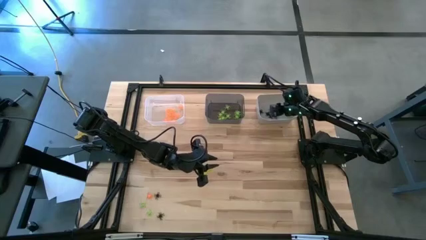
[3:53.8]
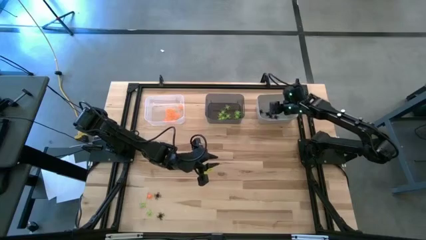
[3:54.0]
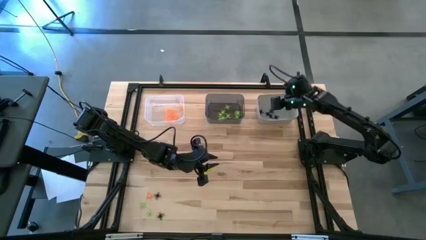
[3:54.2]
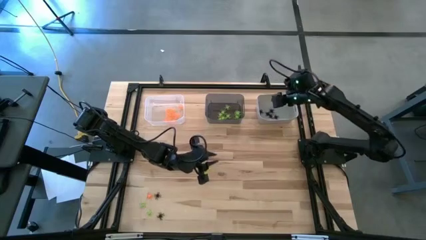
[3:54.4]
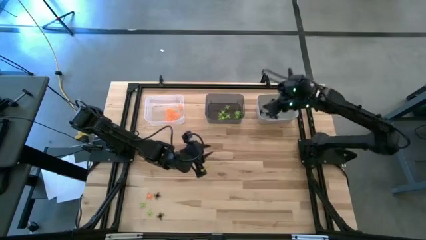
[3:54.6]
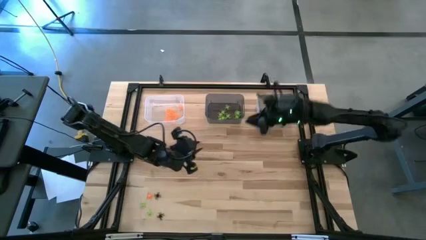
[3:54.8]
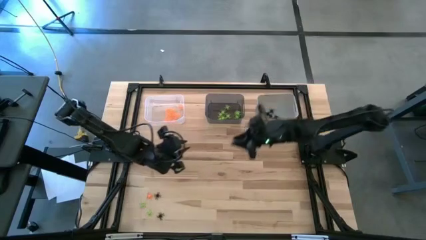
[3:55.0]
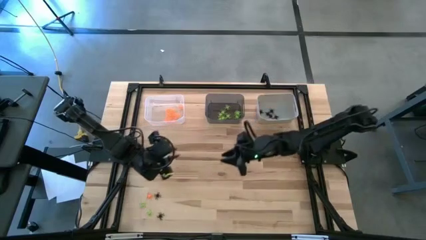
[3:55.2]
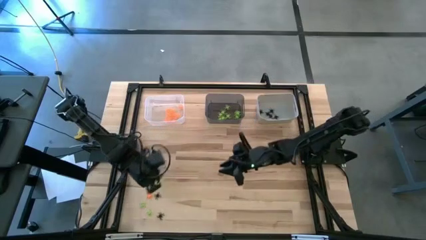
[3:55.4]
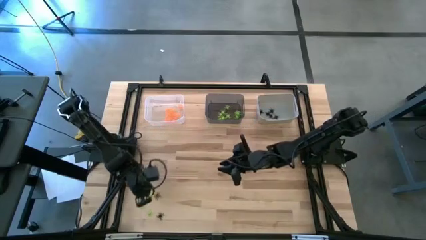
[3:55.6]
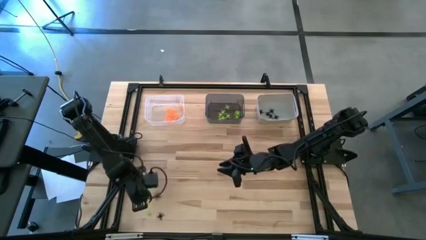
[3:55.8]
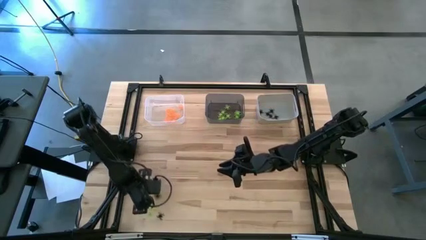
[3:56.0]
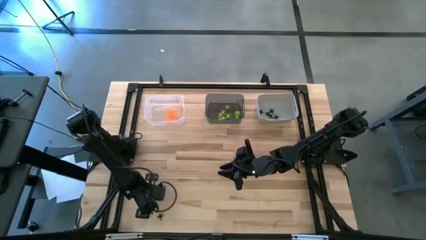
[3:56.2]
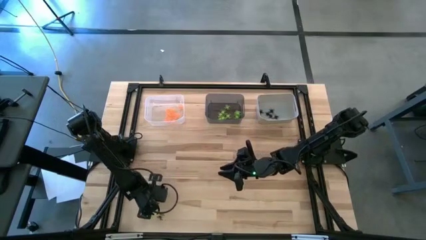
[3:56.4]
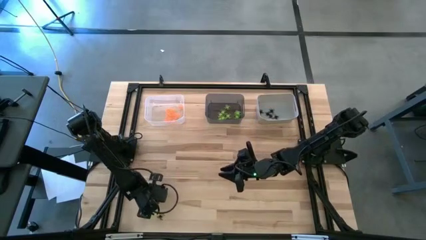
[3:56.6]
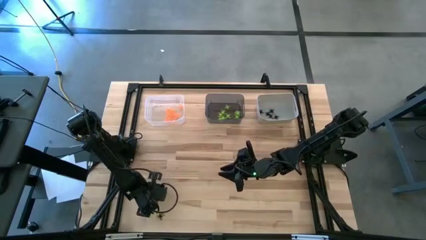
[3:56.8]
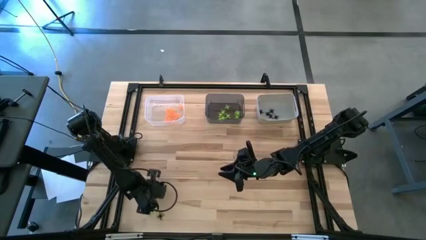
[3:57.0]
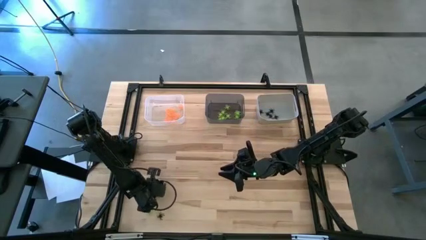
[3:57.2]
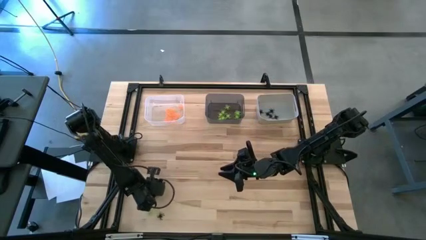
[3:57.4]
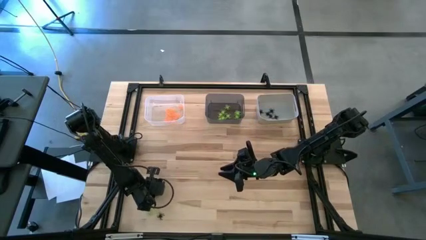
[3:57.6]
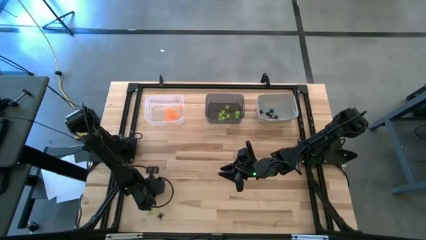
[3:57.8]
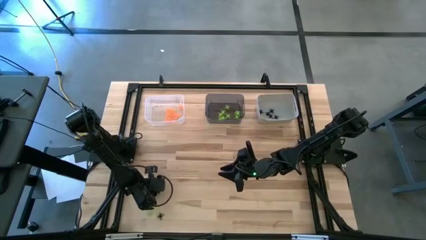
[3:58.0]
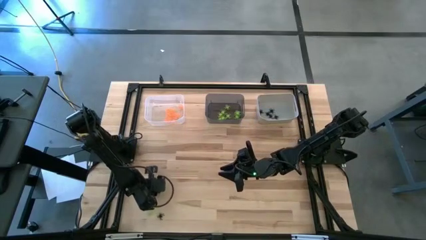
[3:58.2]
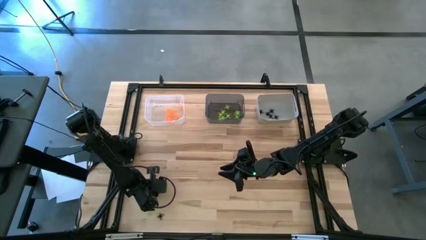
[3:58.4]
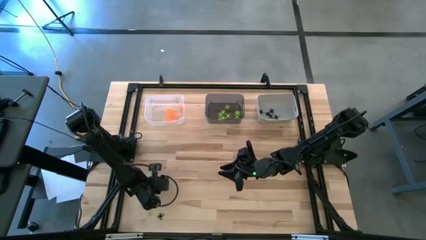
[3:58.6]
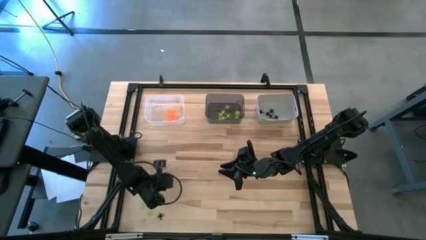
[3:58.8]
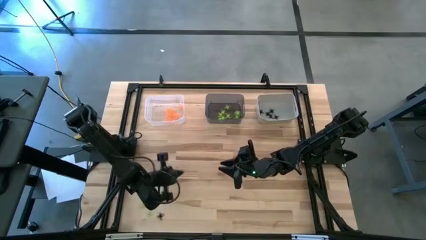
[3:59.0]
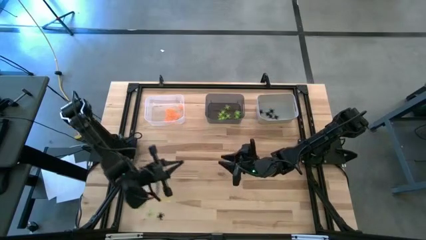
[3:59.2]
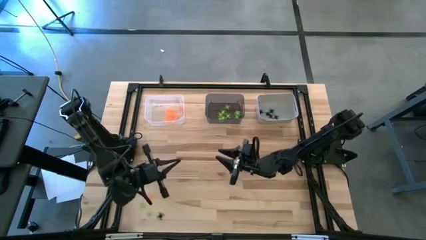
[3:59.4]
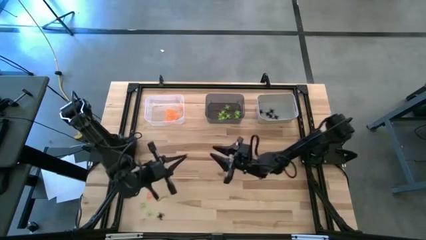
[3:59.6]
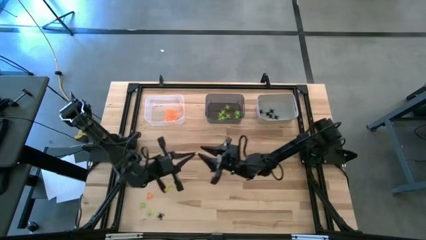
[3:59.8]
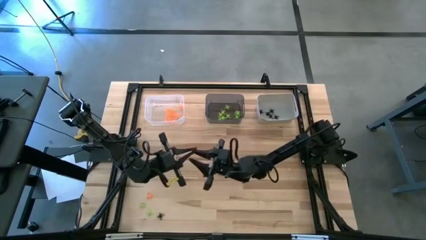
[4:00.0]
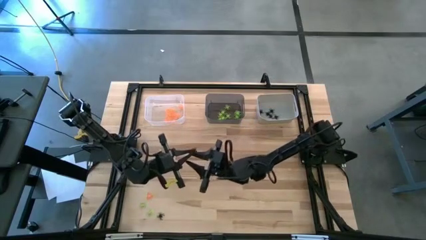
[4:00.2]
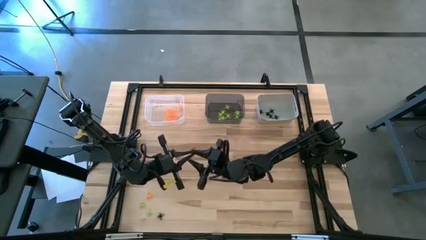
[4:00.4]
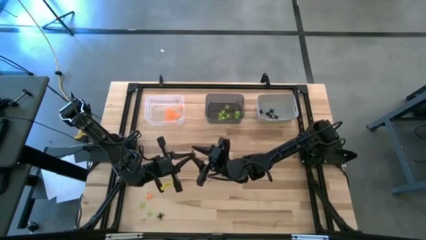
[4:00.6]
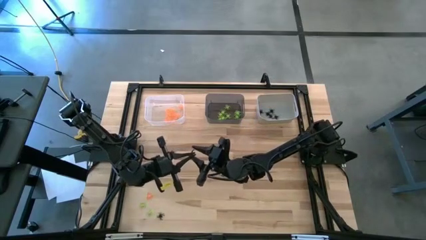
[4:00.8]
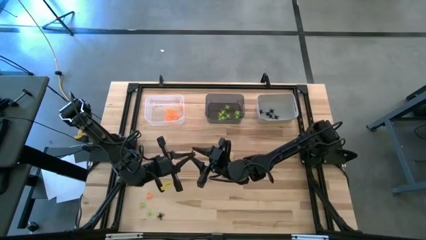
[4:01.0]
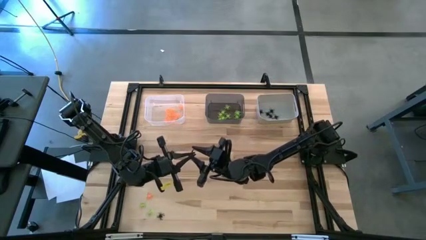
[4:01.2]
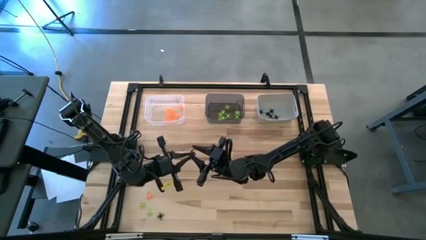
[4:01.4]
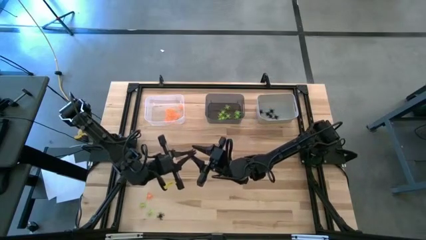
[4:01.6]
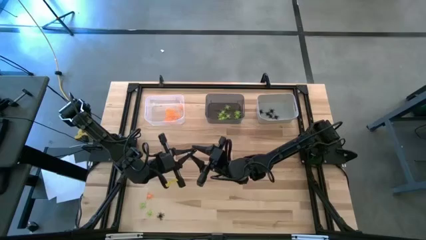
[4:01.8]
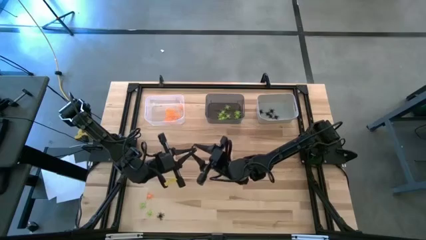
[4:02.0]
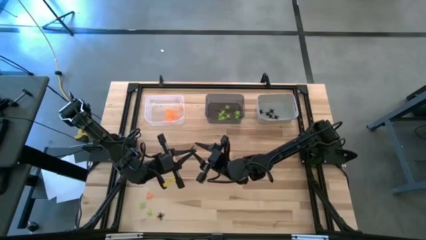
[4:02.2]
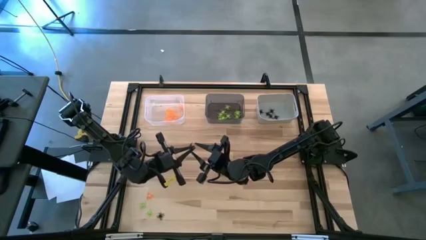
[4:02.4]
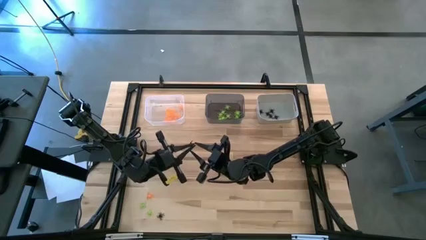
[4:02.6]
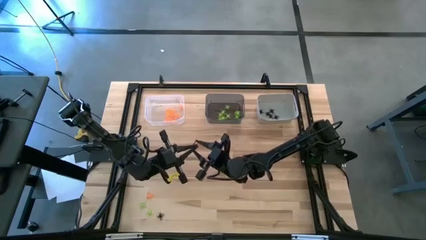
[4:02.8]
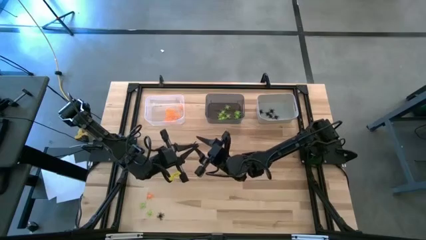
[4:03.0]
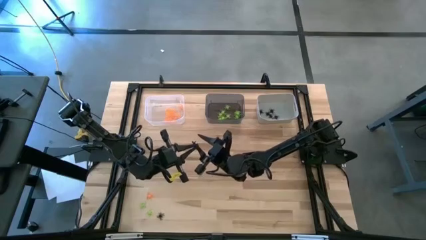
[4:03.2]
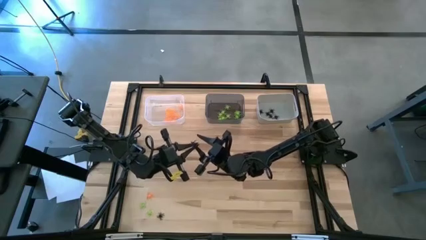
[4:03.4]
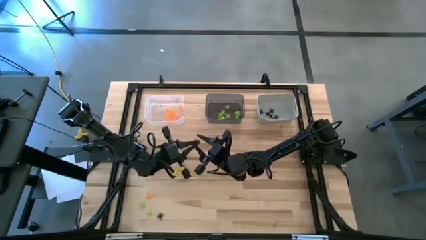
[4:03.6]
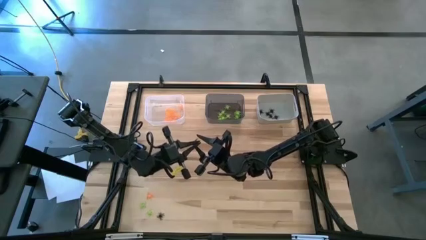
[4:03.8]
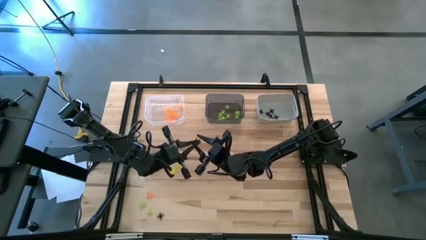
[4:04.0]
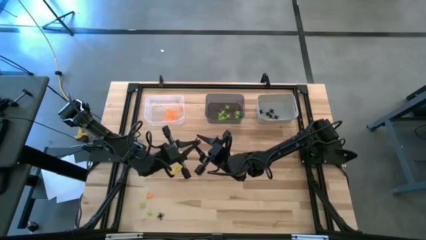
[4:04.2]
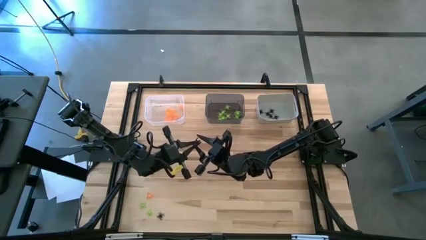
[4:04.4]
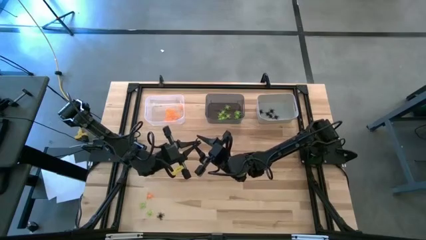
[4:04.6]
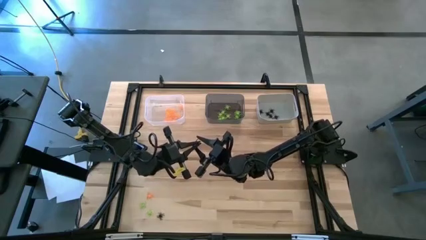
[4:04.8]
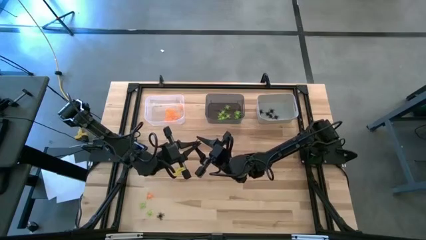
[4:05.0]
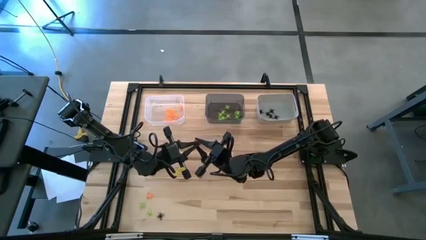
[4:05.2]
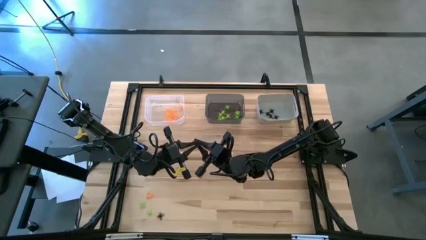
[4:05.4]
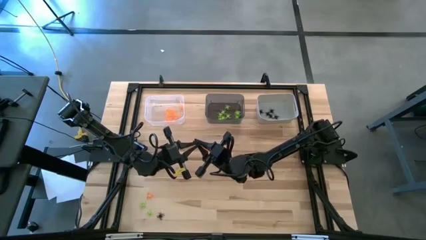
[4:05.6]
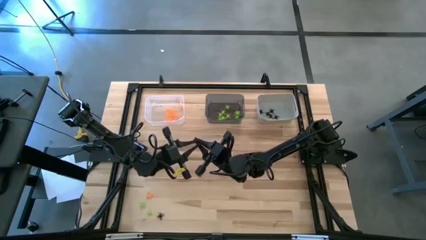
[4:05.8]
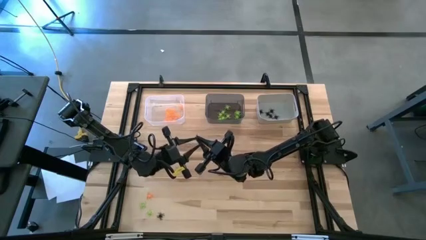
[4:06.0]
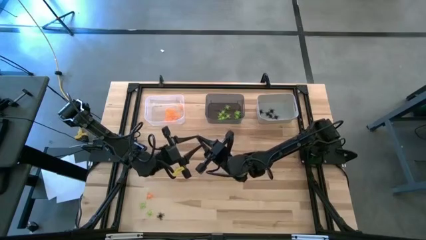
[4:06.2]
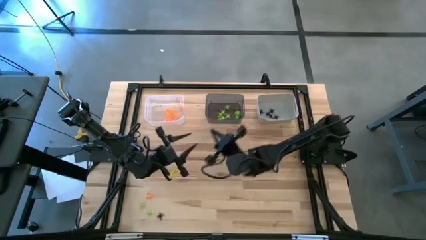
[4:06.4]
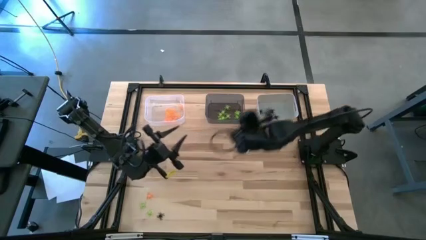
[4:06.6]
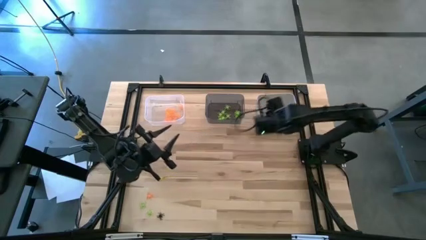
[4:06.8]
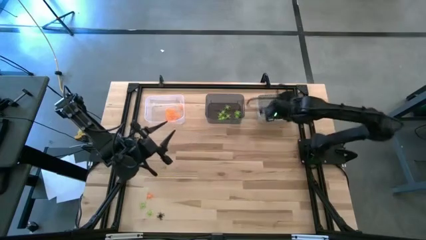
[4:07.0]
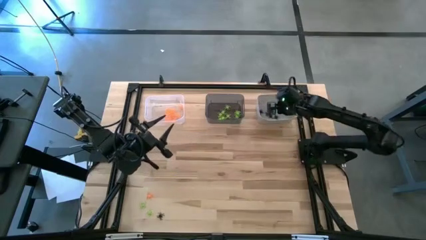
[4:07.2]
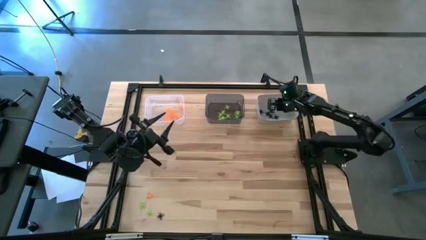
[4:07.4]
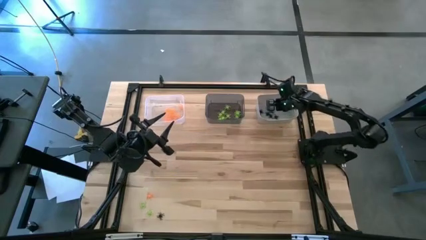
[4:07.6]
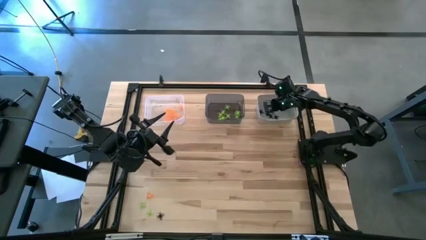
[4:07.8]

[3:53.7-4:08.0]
Task: Sort Halloween decoration
Put the black spider toy into the white bin

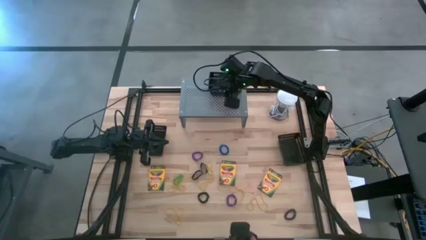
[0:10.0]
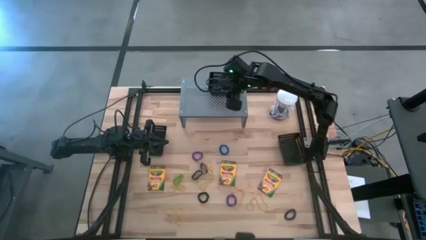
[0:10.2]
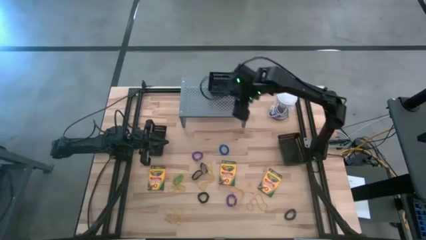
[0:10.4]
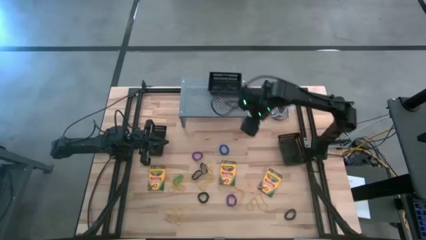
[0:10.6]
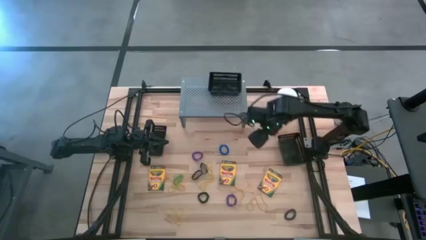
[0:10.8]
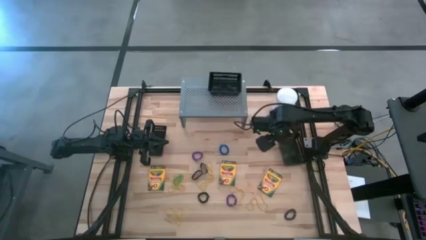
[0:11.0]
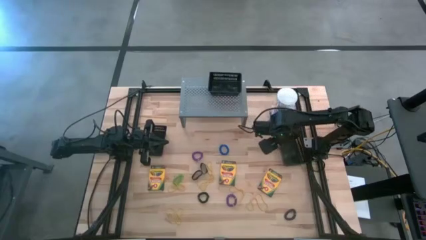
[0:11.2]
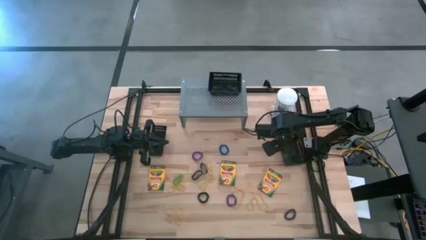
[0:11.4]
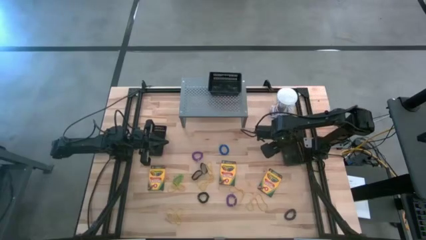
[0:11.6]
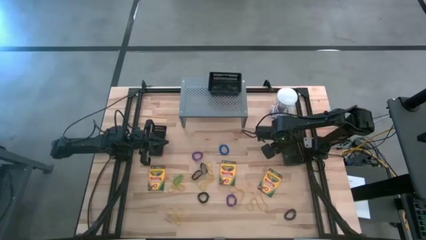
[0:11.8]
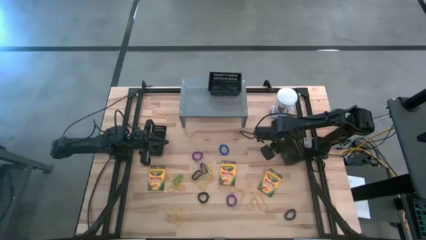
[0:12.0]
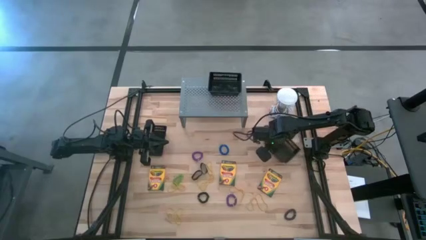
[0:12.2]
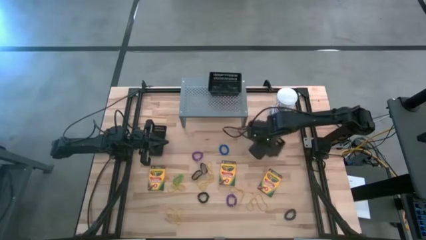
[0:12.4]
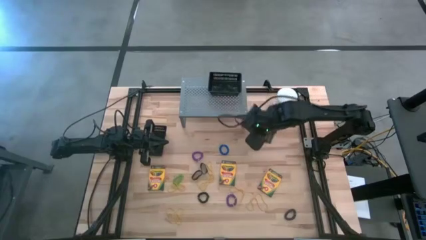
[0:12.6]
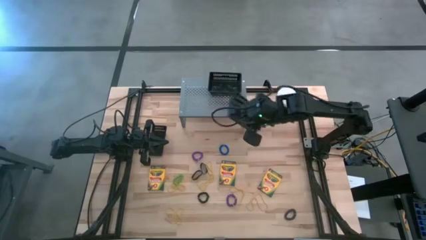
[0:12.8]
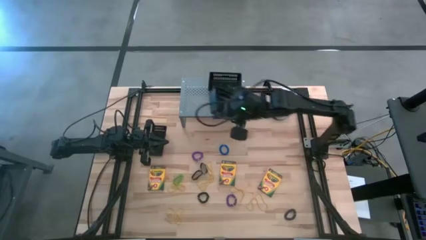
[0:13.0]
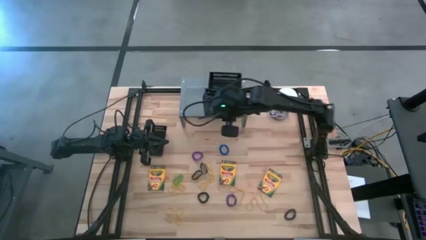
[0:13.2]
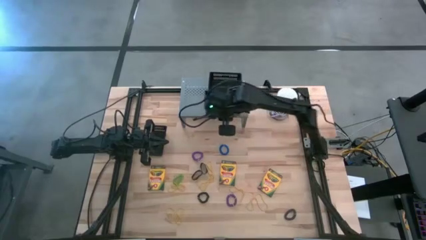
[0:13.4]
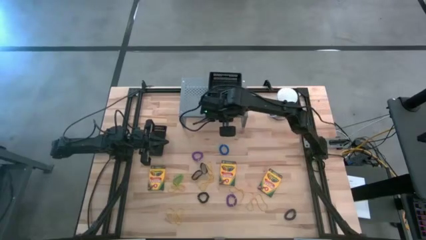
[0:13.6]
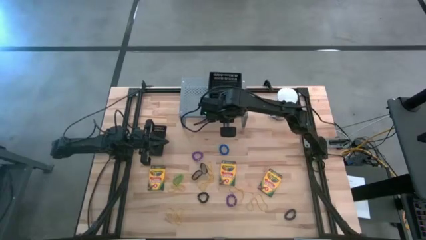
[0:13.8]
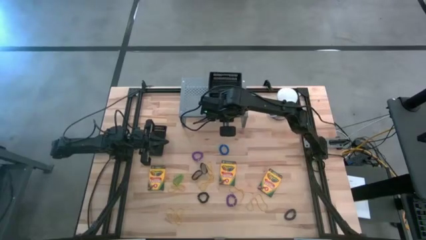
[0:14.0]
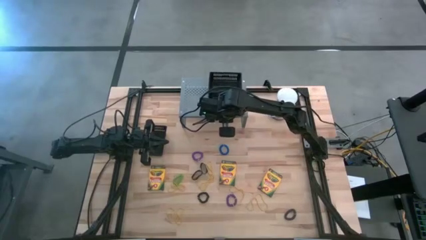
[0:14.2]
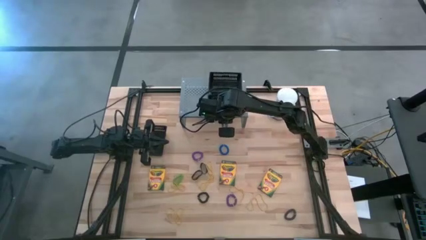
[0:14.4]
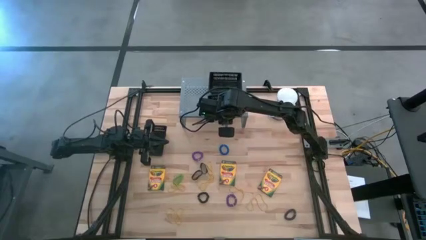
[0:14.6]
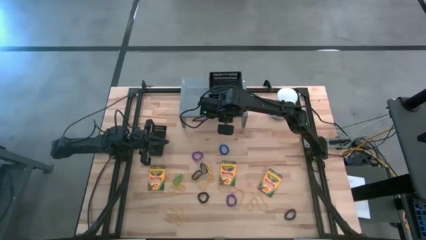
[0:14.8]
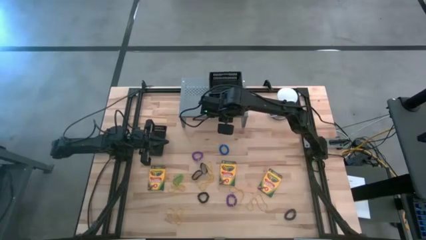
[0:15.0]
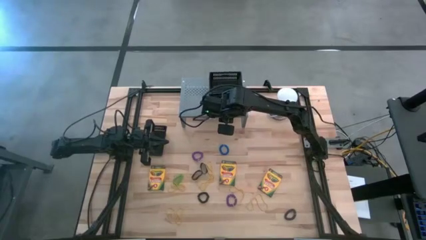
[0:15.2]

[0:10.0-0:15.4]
Task: Pick & Place Office Desk Supplies
Put the right black bin on the shelf
